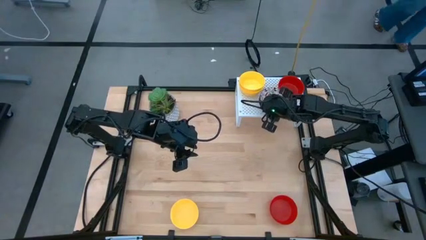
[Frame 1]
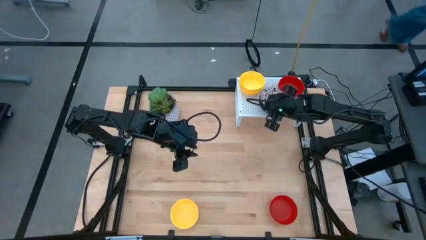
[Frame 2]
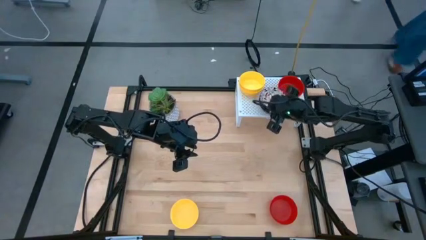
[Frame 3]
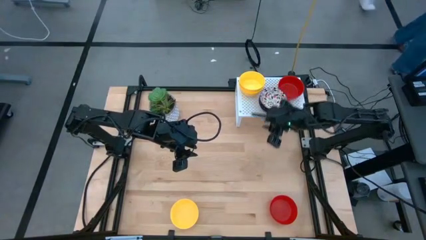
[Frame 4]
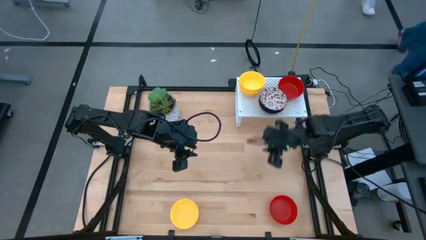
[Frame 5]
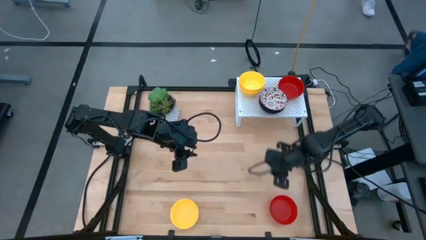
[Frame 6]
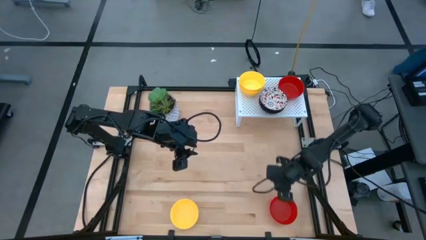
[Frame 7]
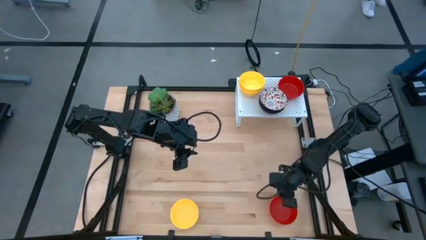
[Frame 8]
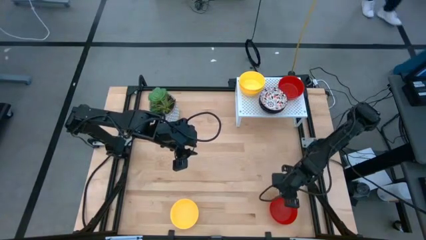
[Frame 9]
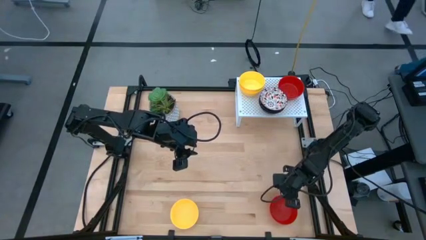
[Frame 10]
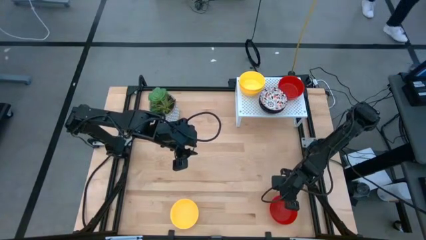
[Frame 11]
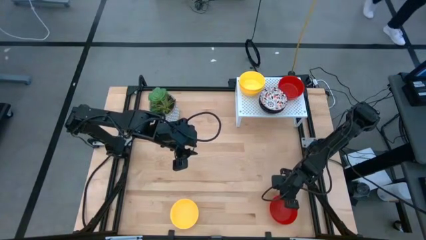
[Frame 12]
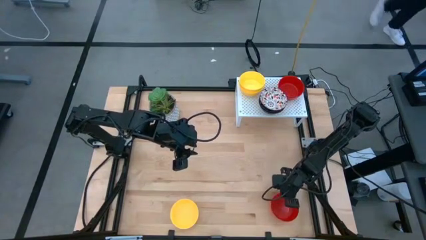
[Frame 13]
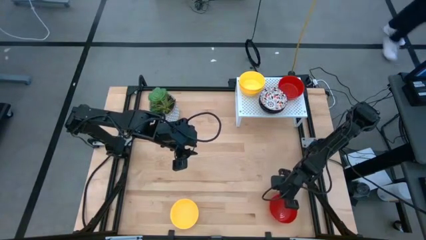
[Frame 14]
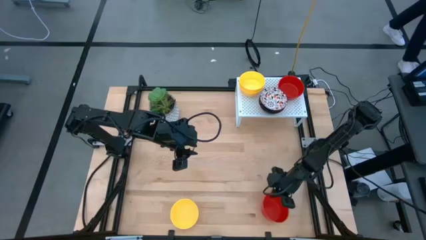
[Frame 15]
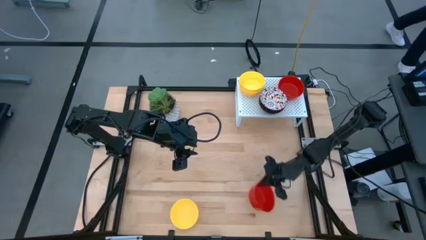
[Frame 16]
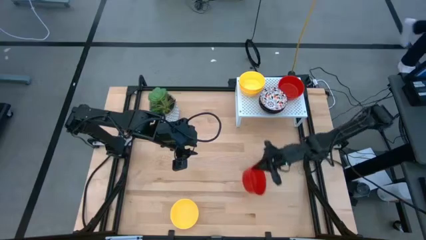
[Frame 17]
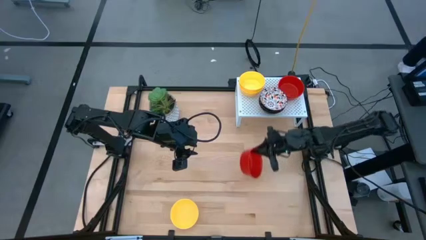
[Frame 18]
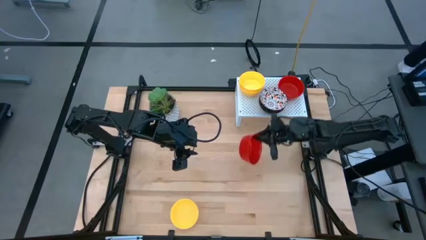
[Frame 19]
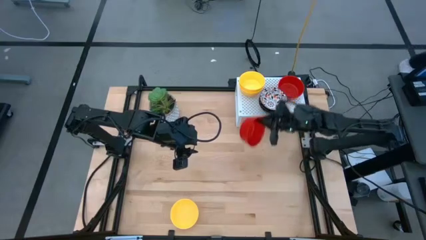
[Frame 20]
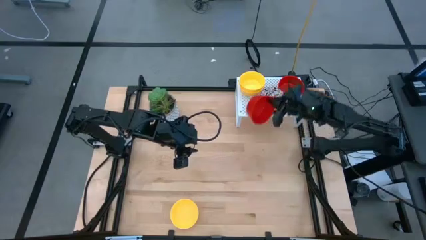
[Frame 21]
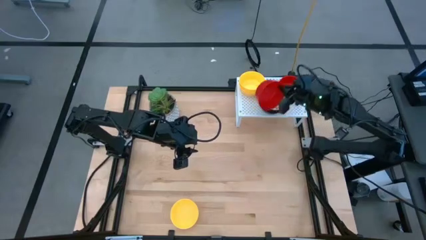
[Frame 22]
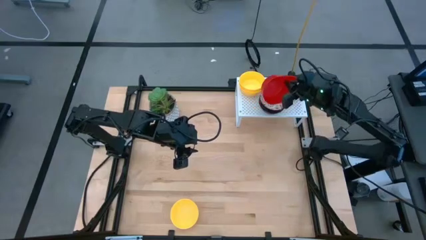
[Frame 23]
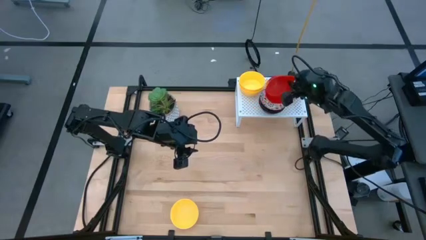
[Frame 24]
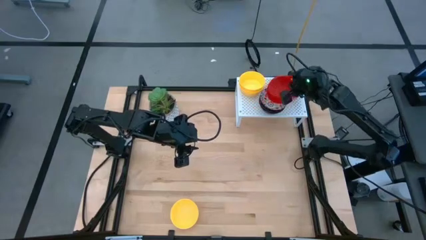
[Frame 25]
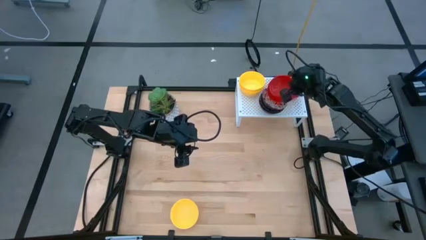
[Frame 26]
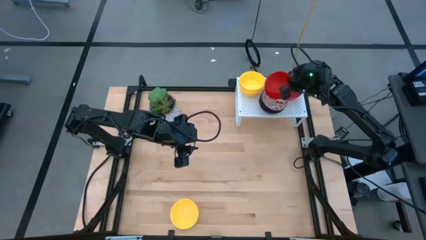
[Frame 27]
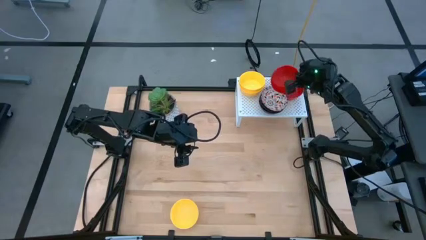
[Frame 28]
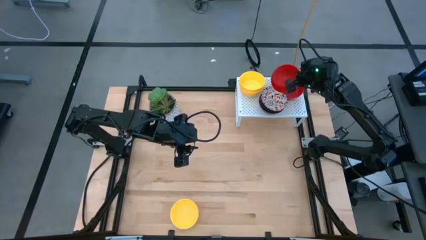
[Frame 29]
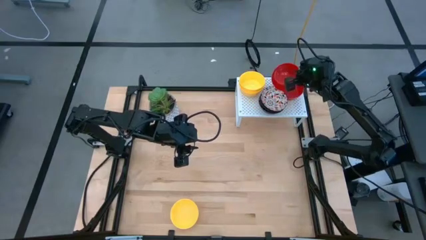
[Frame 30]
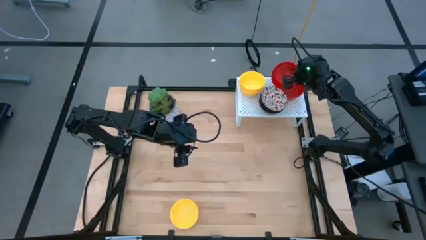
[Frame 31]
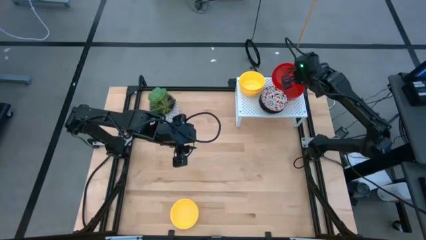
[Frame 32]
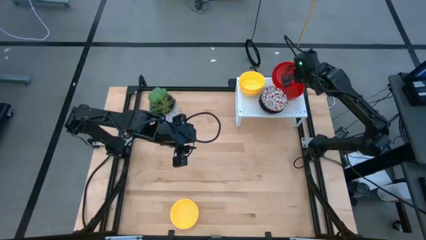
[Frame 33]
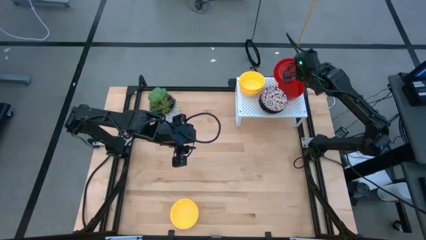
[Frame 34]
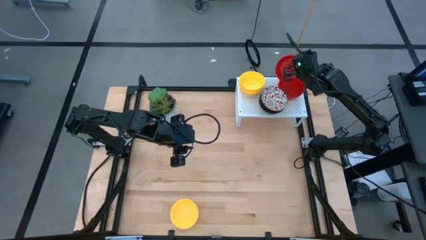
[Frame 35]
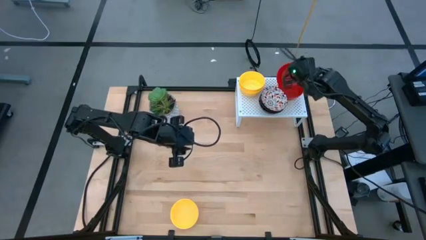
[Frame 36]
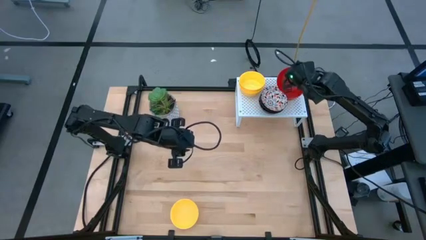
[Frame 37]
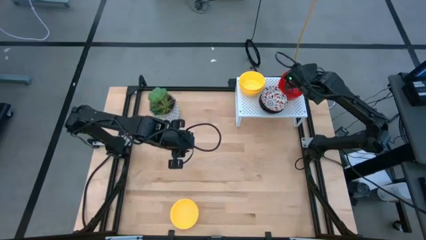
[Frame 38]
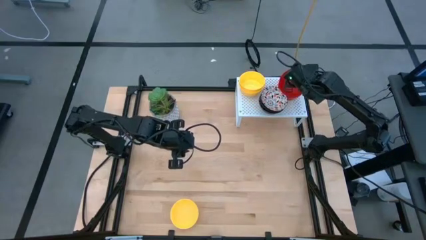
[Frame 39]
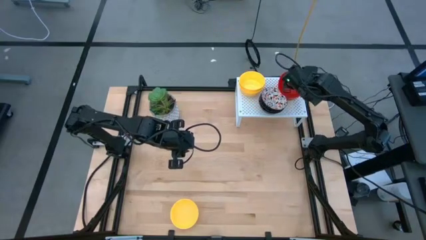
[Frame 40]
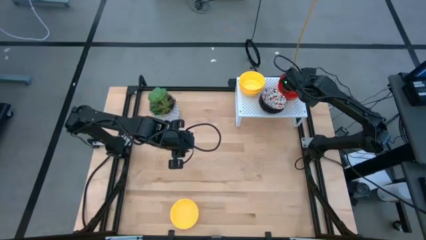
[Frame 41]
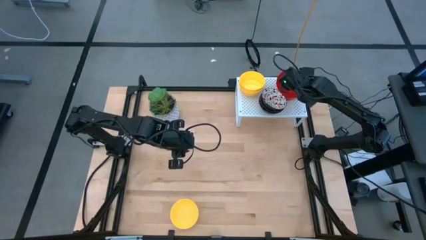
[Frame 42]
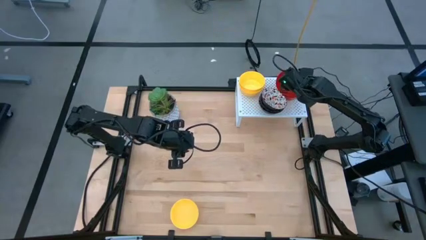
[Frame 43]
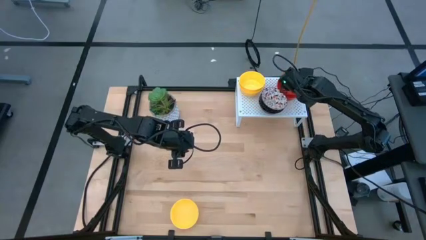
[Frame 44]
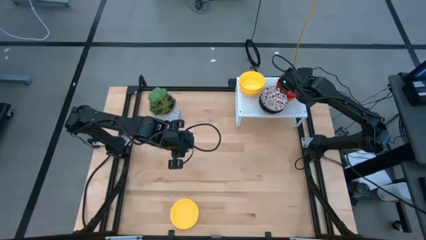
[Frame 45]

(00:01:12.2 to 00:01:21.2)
Task: Pick & Place Mini bowls
Stack the red bowl on top of the red bowl on the shelf

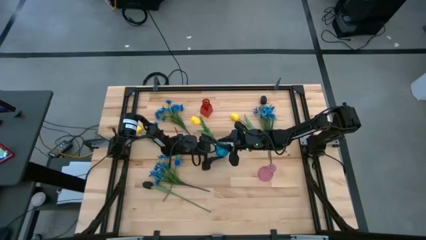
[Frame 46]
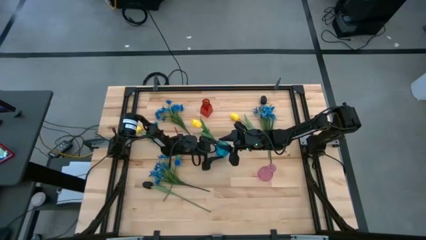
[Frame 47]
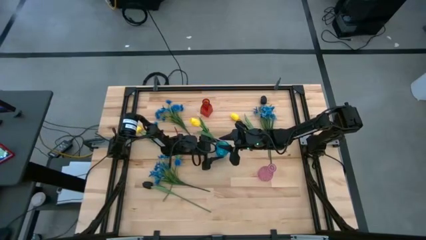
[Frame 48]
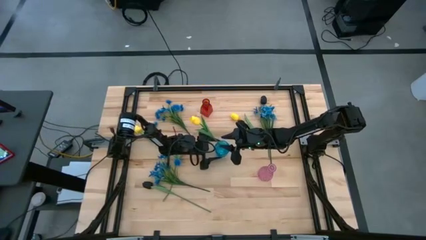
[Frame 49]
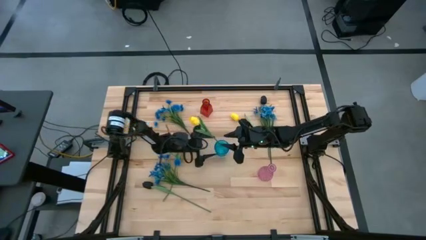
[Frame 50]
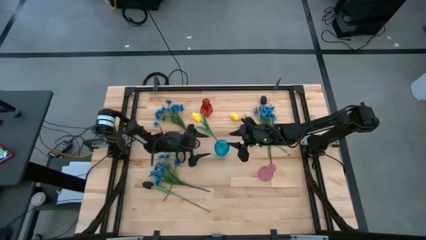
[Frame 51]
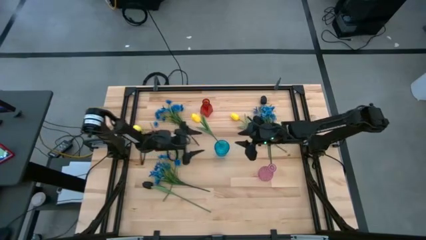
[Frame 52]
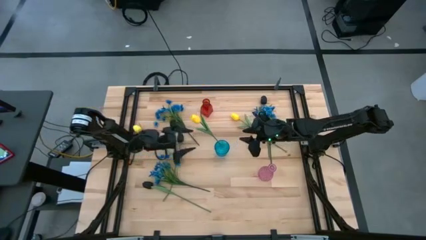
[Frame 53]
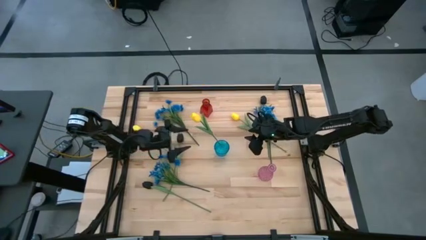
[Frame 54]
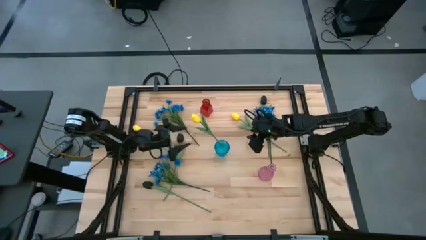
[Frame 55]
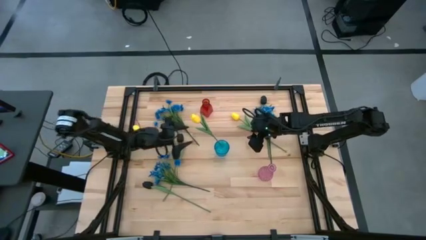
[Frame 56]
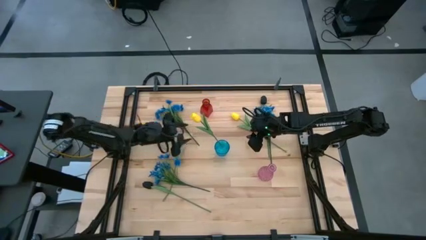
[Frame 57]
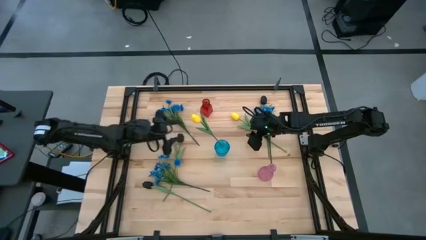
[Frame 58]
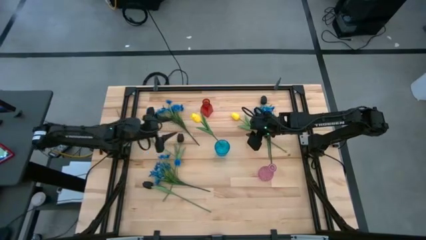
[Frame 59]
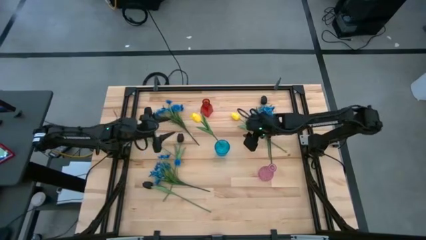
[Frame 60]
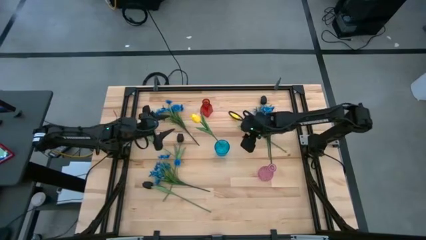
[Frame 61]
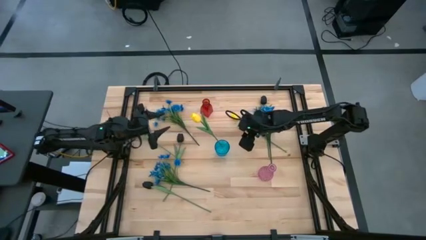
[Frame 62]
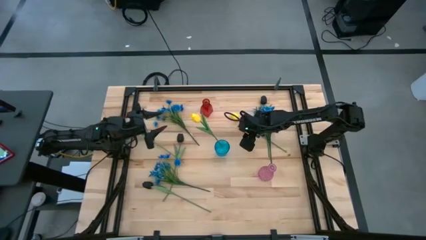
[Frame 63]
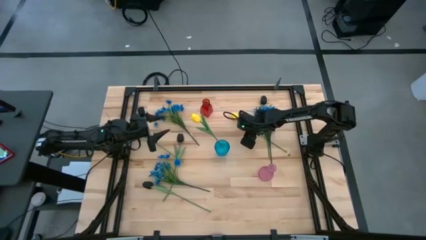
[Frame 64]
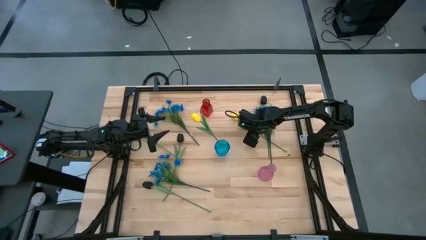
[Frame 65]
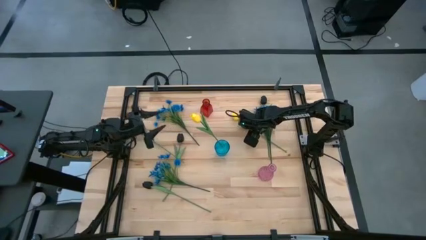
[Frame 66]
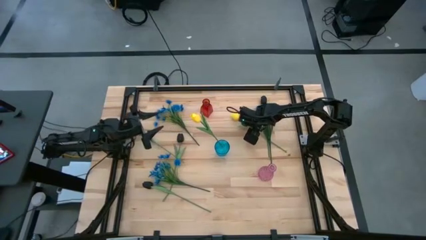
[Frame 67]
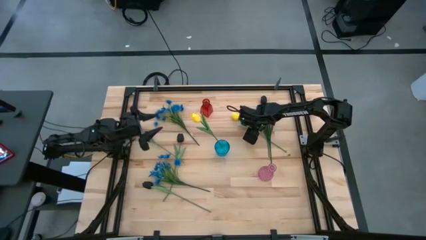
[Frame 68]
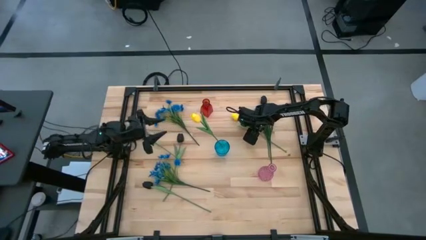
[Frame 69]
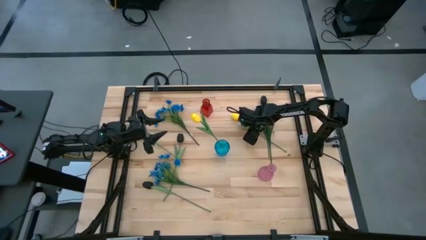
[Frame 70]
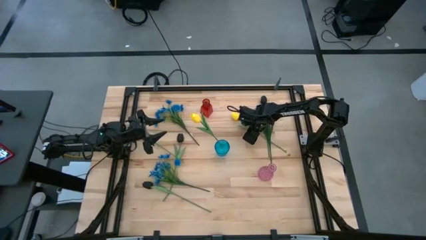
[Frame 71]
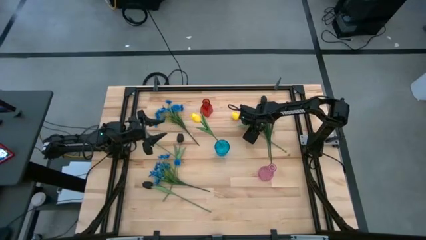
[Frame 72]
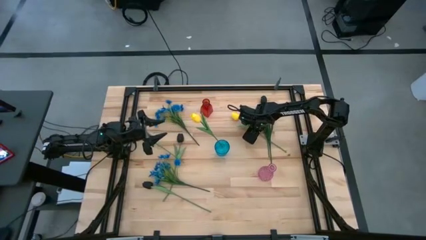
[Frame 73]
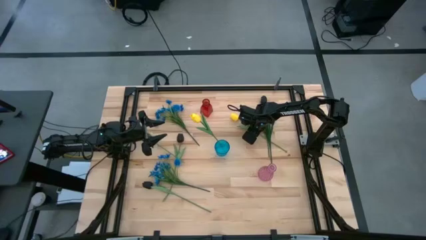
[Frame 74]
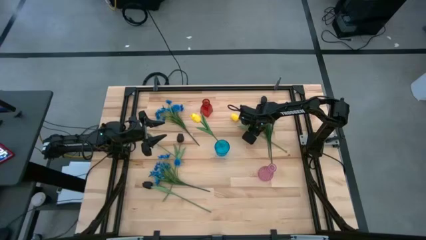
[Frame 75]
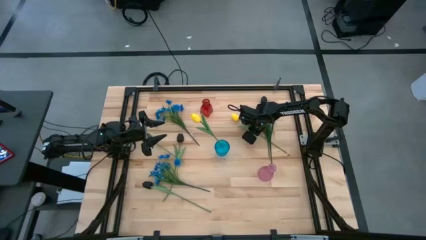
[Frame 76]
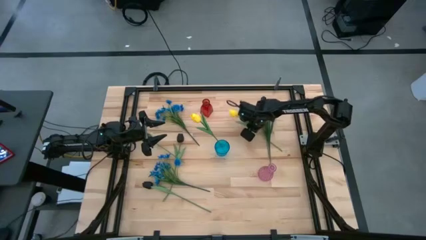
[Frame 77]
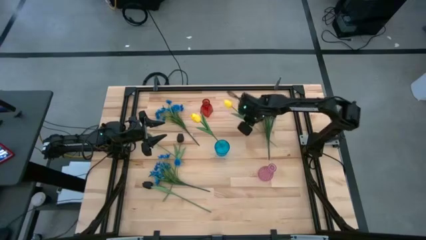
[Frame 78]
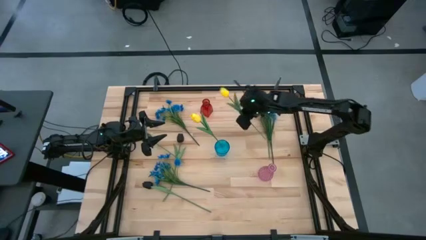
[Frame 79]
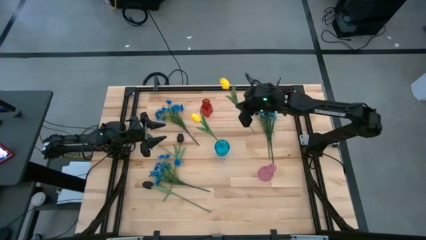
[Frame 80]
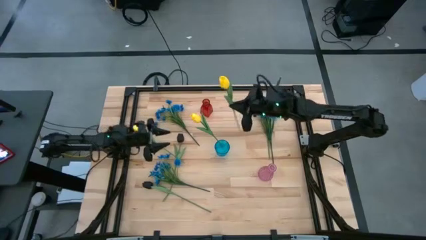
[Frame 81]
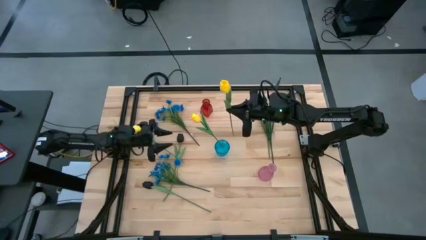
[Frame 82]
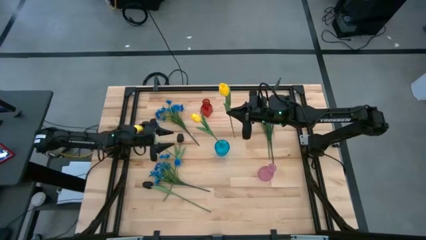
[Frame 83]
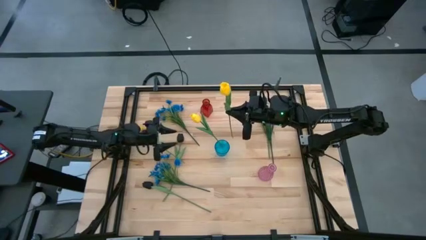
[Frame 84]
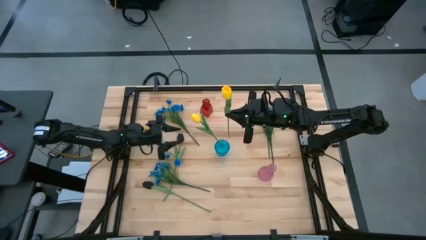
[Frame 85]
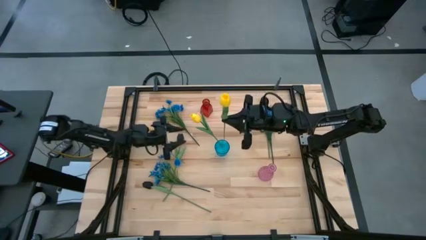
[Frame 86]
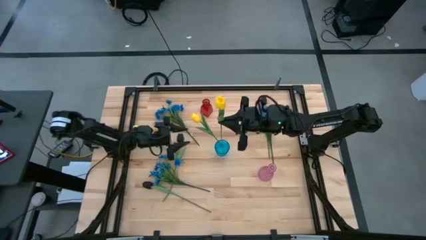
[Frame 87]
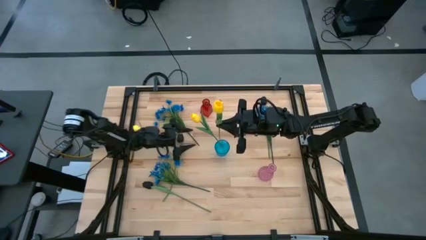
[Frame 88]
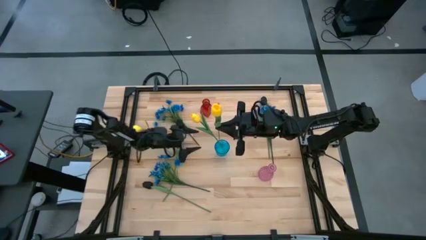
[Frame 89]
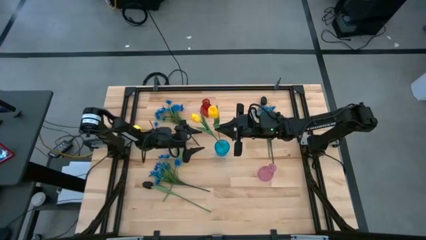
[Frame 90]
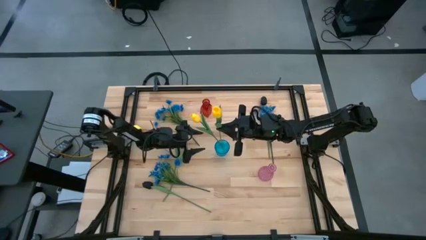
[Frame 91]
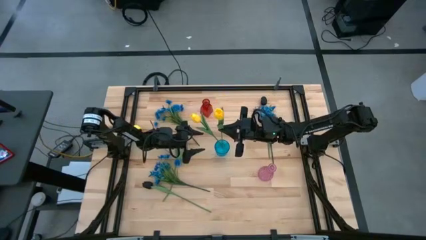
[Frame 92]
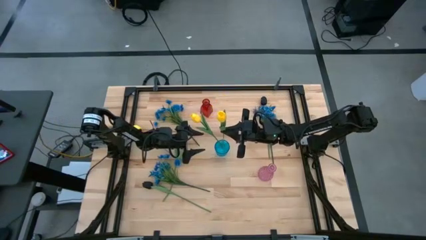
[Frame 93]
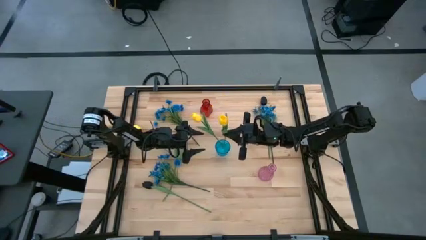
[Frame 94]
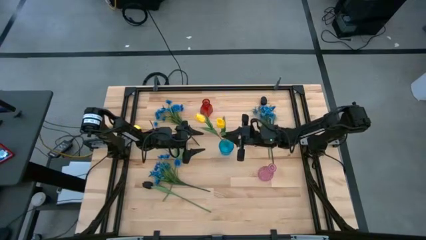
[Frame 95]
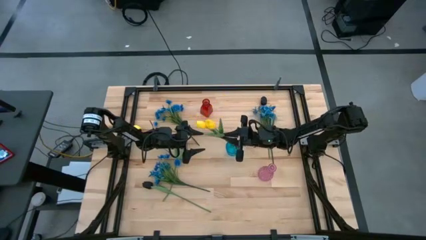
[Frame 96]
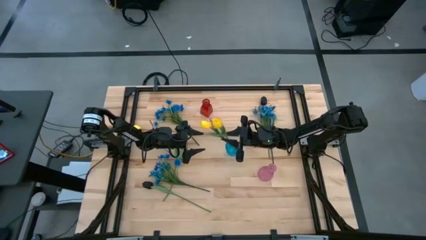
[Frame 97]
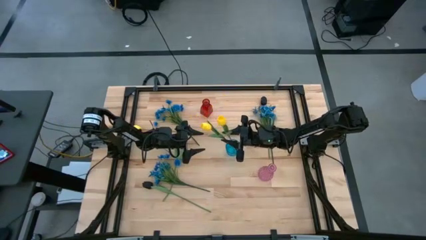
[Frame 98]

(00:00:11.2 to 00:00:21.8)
Task: Sort flowers into vase by color
Put the yellow flower into the blue vase
